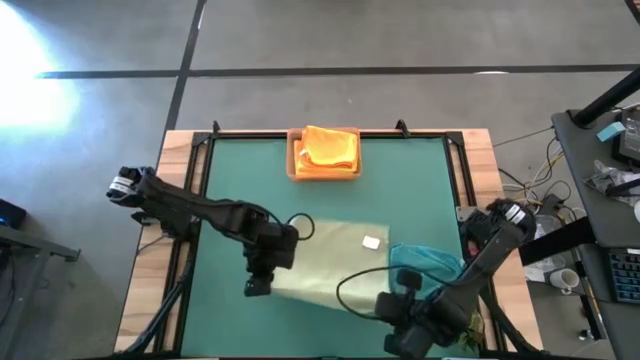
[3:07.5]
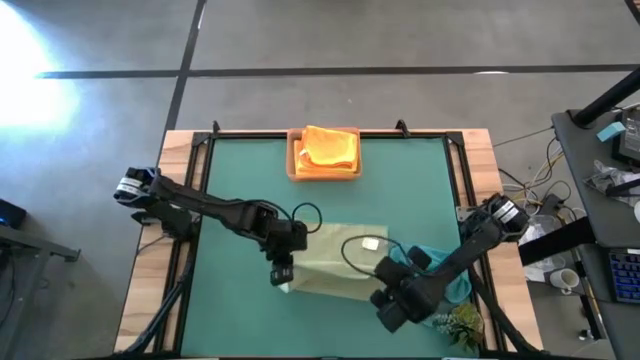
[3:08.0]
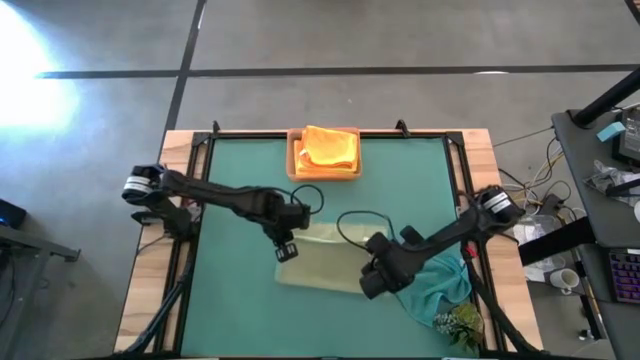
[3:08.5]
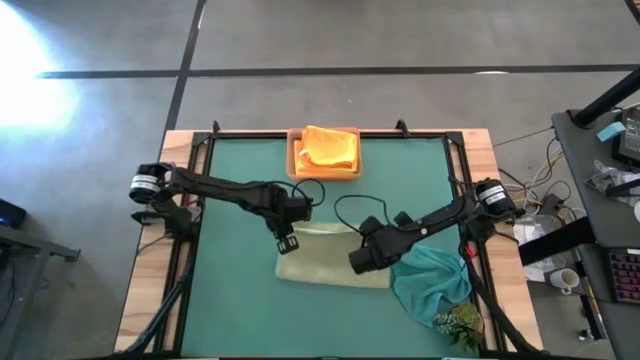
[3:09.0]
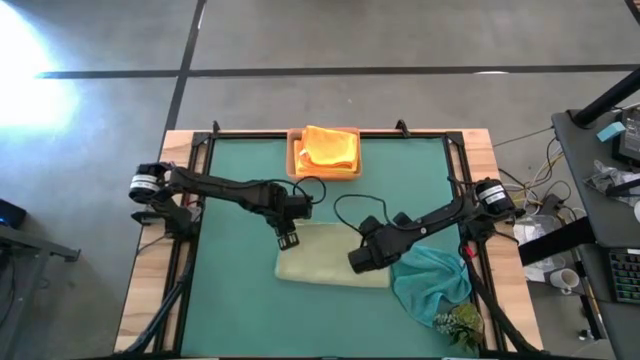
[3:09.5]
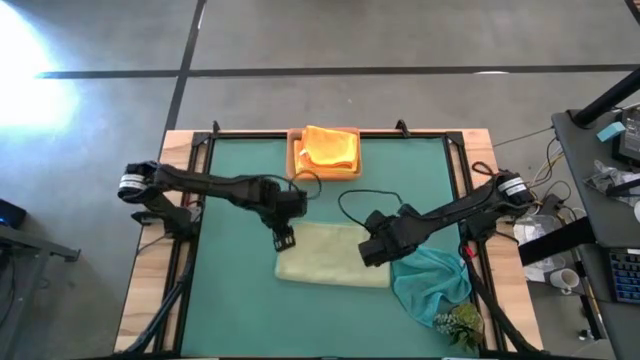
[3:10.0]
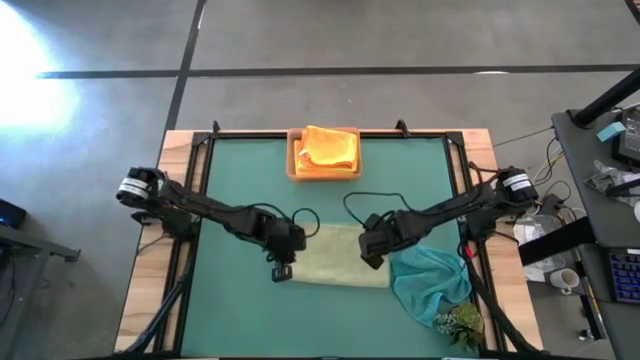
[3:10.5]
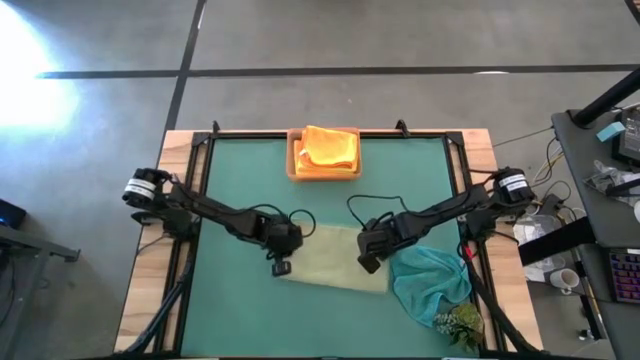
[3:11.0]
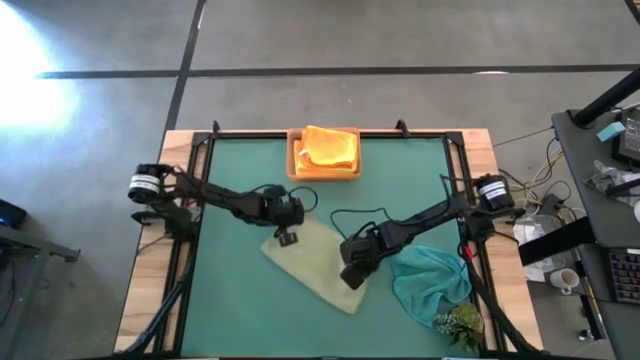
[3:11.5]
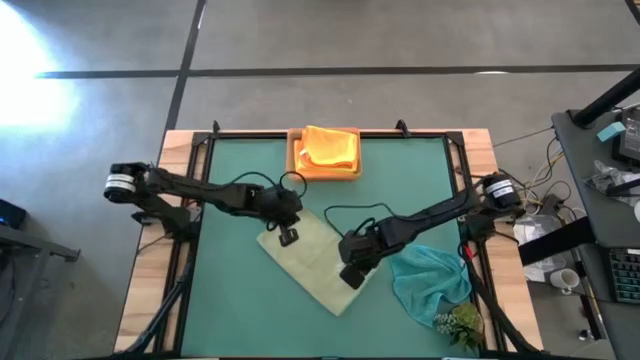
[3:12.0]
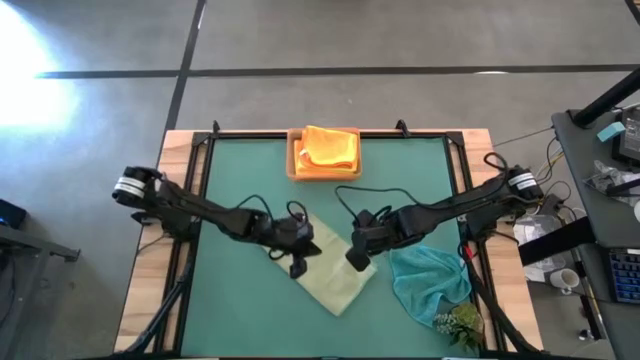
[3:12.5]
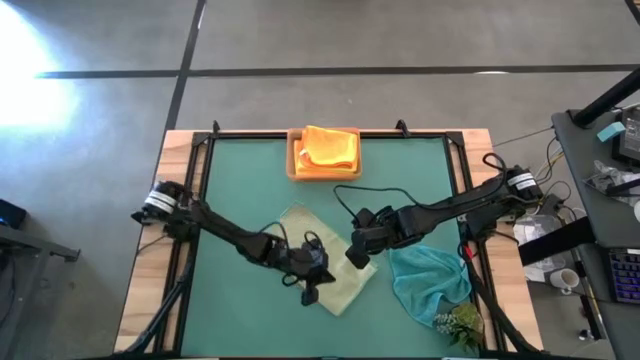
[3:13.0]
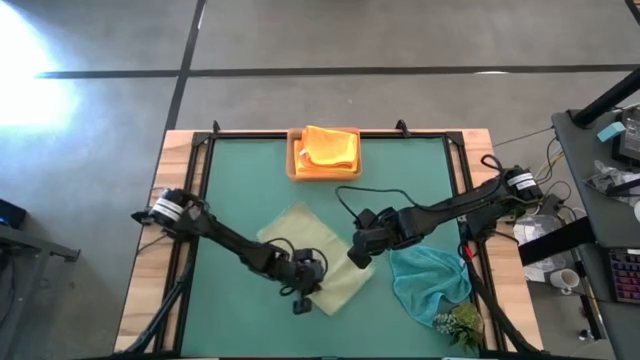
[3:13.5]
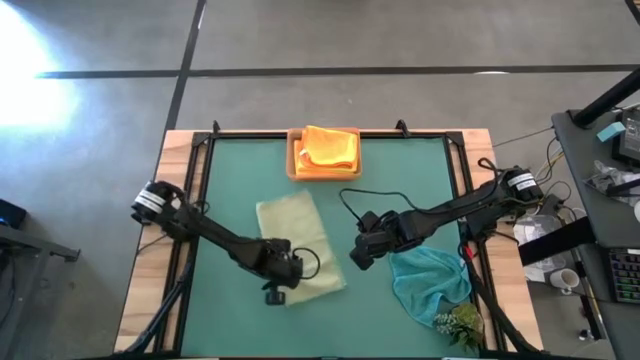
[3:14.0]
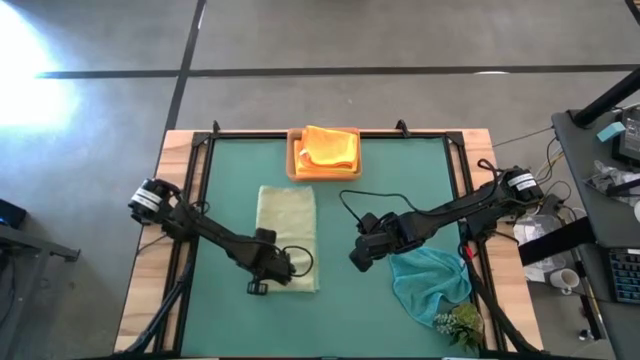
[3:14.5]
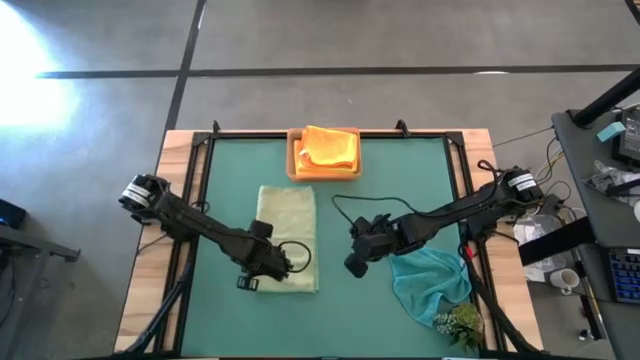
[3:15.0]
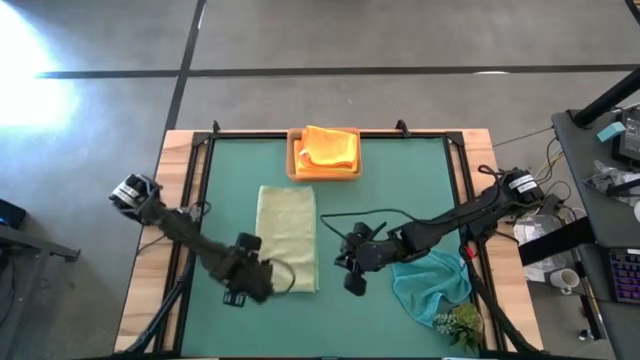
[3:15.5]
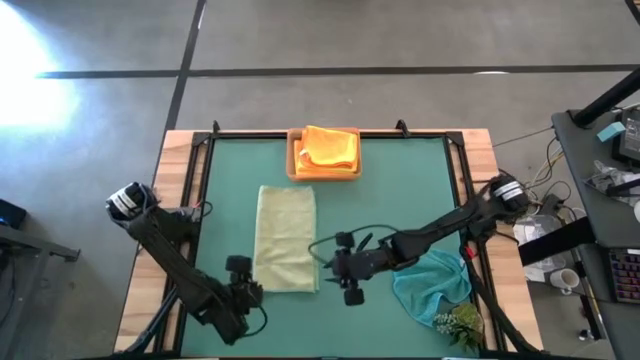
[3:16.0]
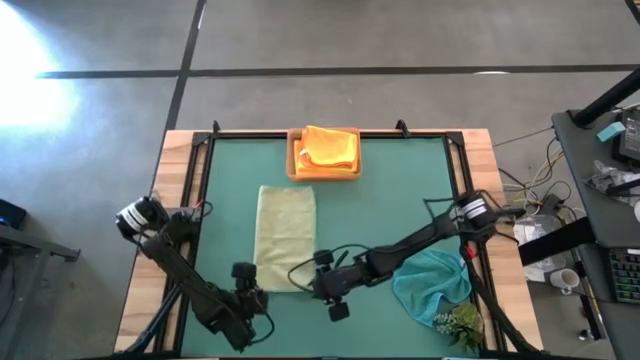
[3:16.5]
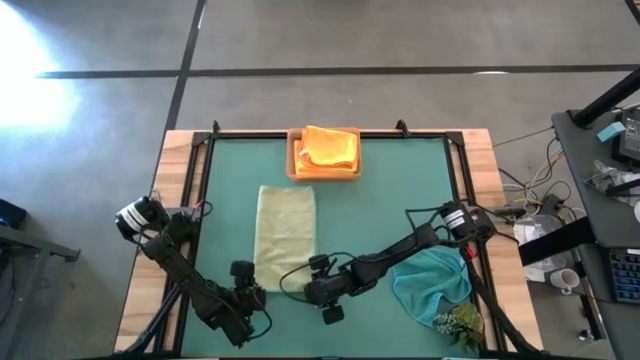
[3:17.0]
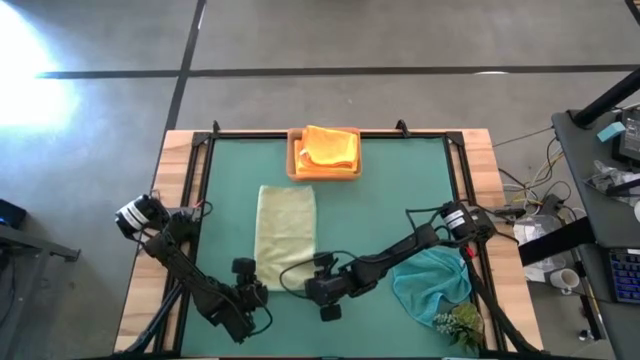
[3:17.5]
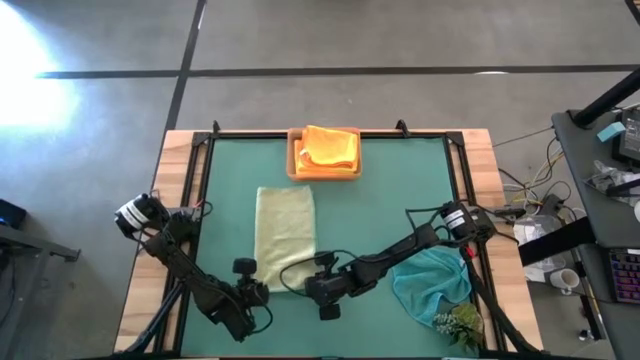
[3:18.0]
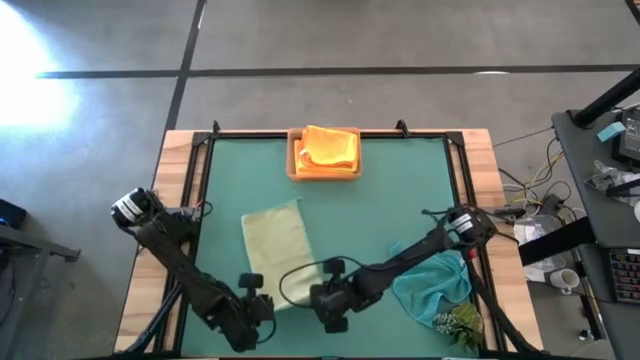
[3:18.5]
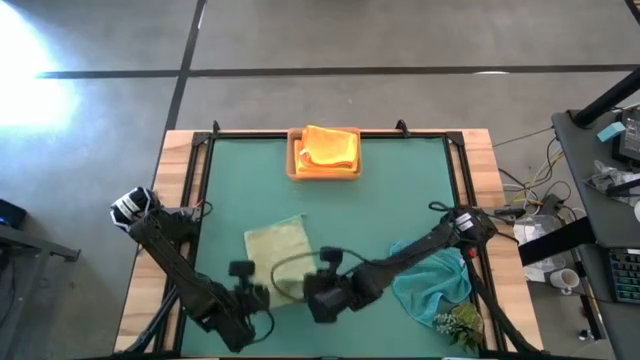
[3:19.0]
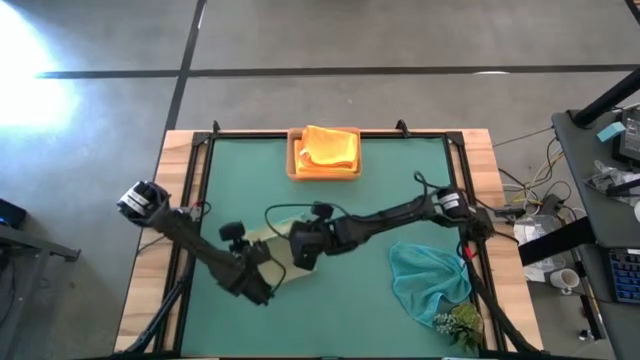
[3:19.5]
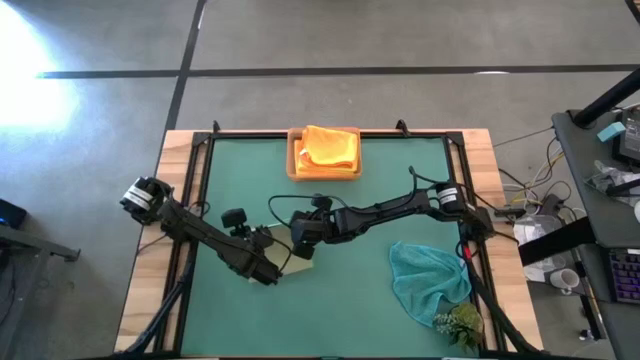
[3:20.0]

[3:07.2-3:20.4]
Task: Fold microfiber towels
Fold the gray towel

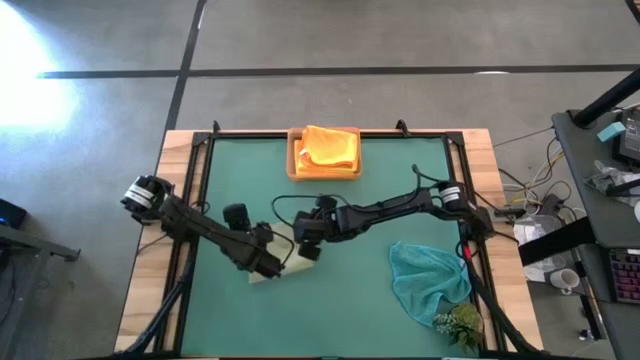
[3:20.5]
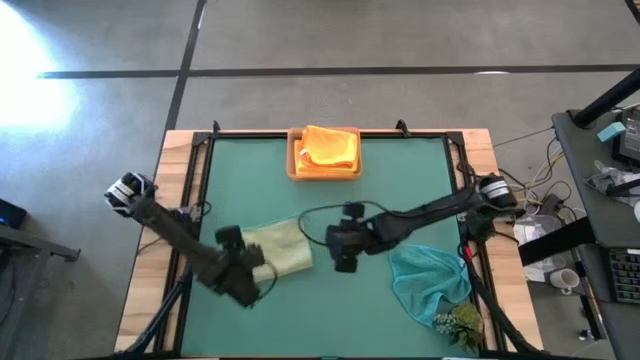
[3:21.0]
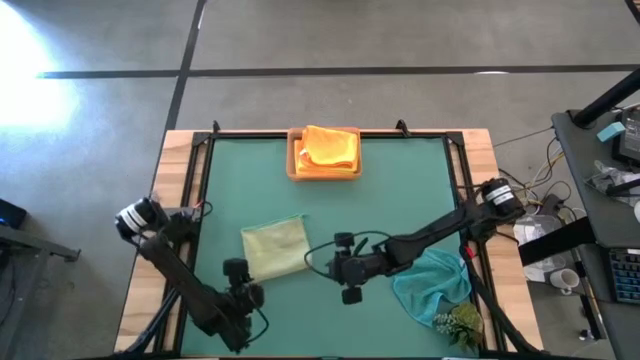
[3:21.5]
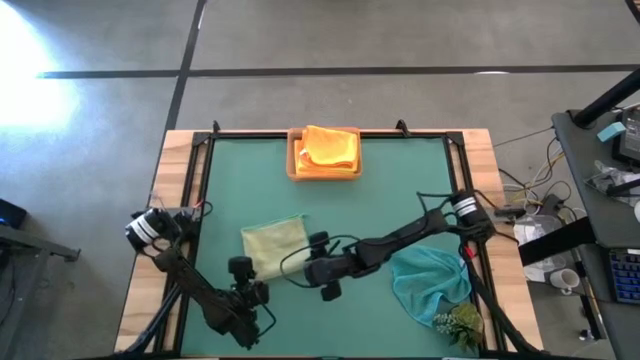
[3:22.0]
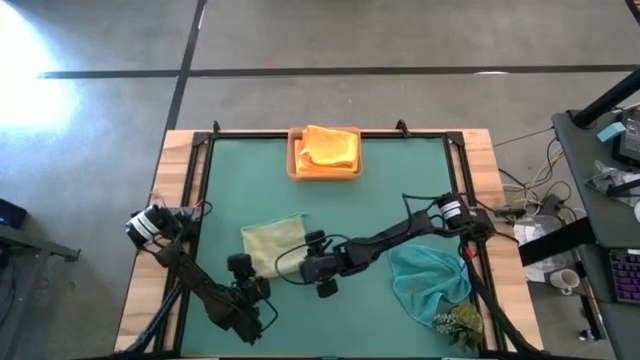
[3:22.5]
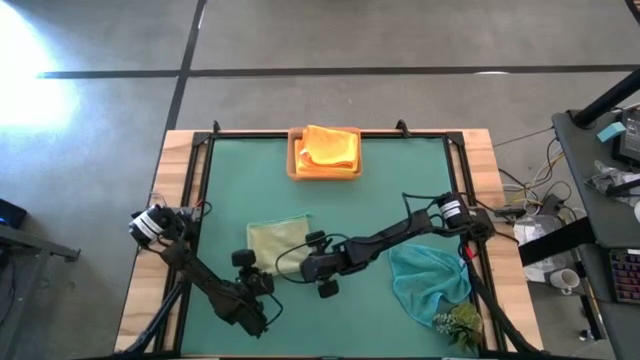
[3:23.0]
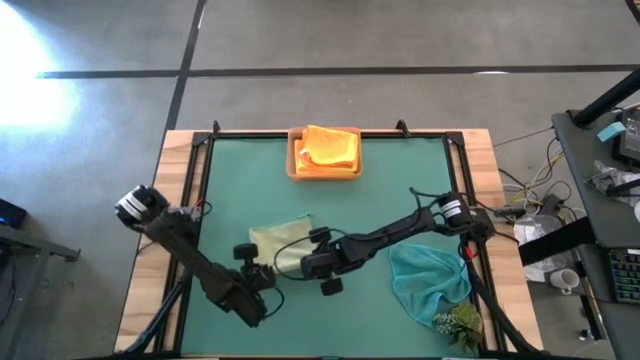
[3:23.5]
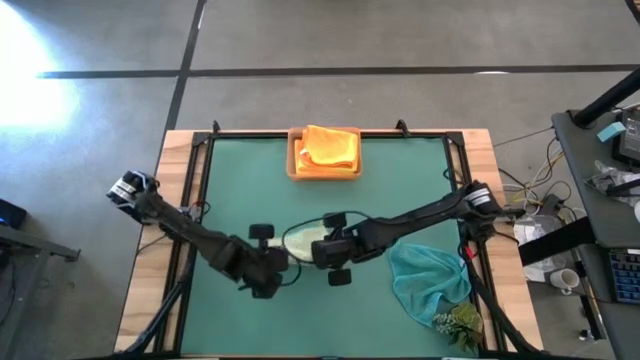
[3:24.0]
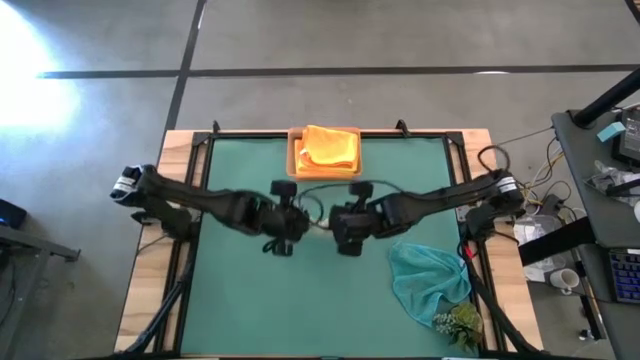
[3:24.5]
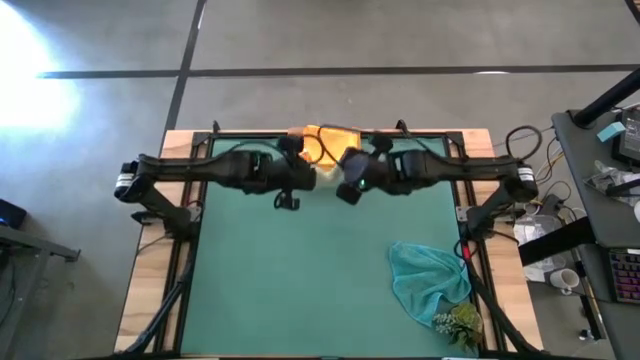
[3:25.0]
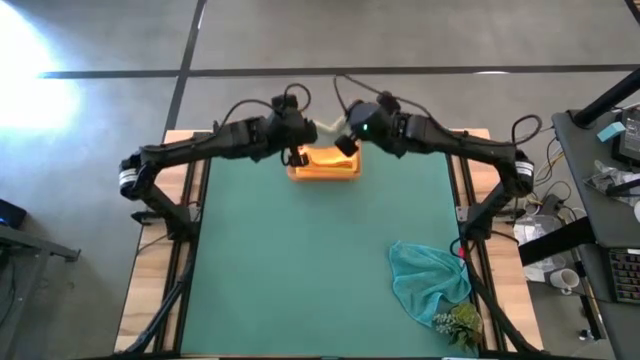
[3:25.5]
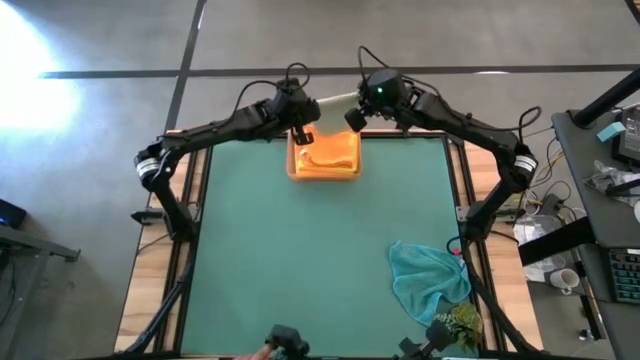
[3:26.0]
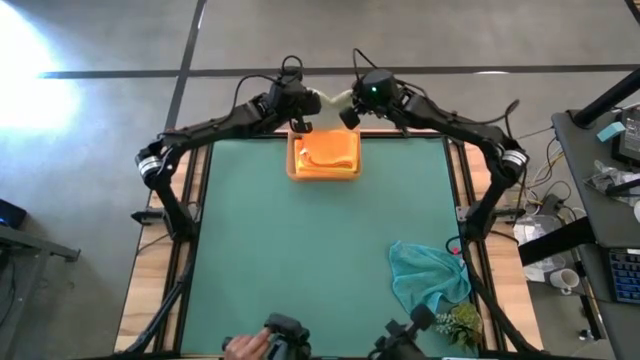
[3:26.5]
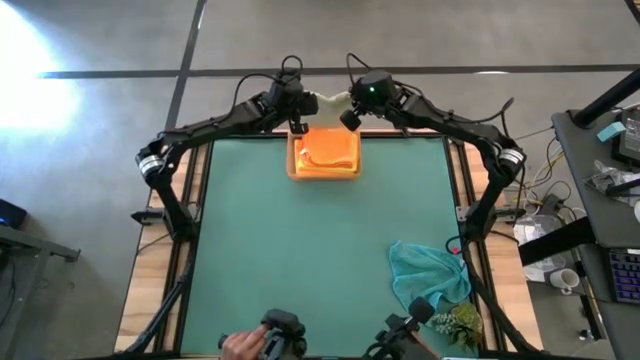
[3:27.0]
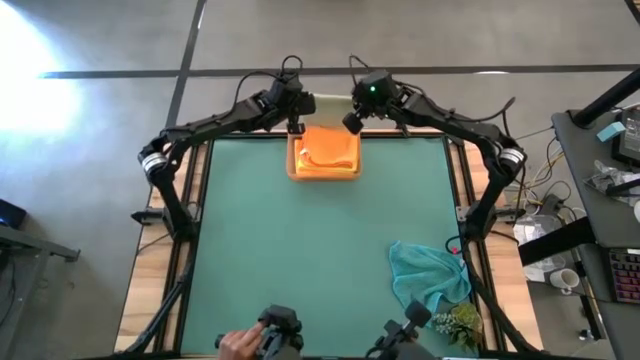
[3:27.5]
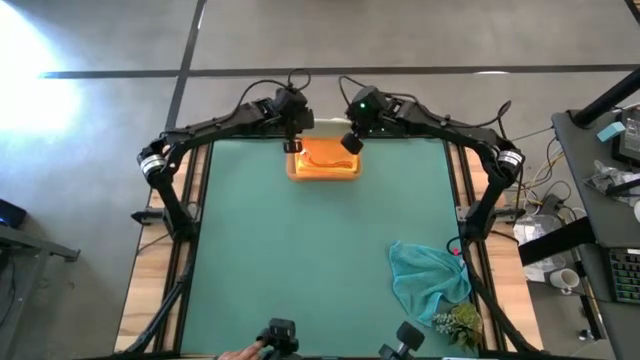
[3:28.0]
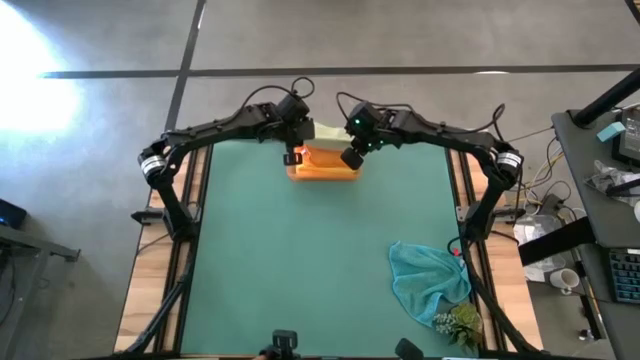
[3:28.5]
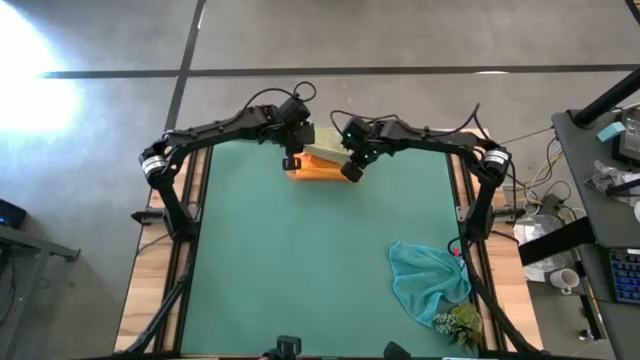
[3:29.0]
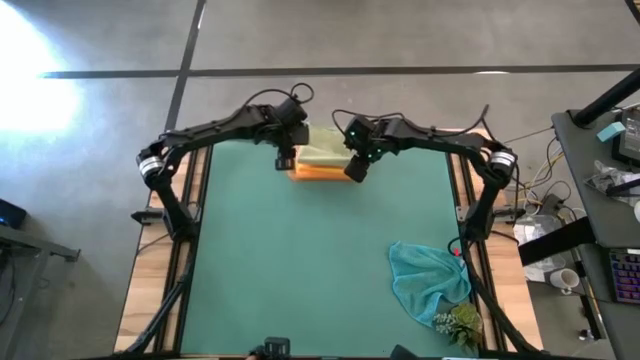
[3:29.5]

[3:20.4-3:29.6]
Put the gray towel into the orange bin
